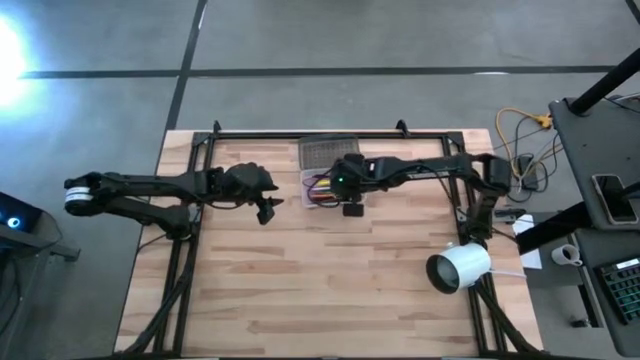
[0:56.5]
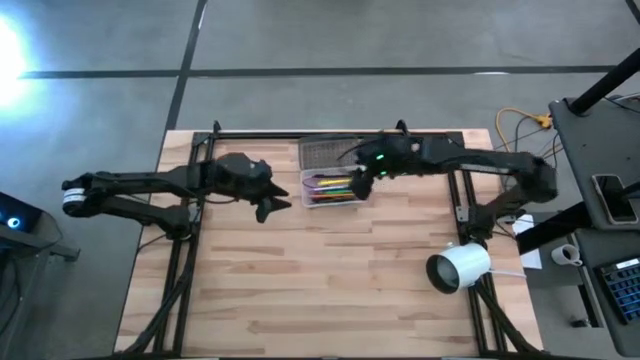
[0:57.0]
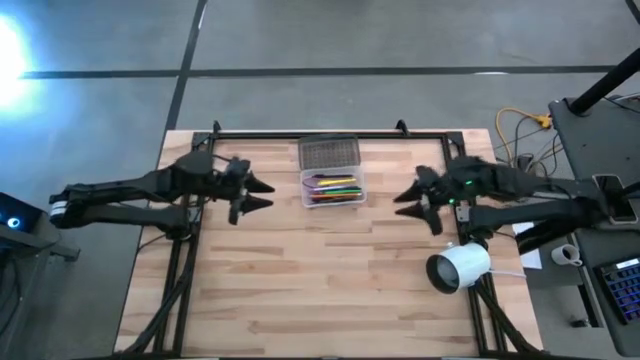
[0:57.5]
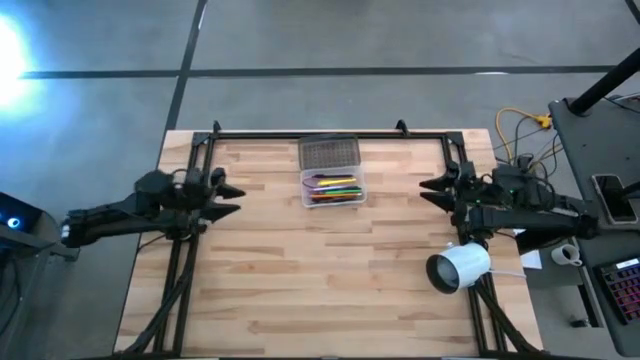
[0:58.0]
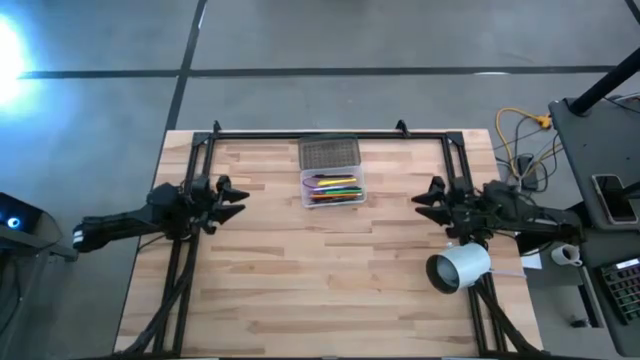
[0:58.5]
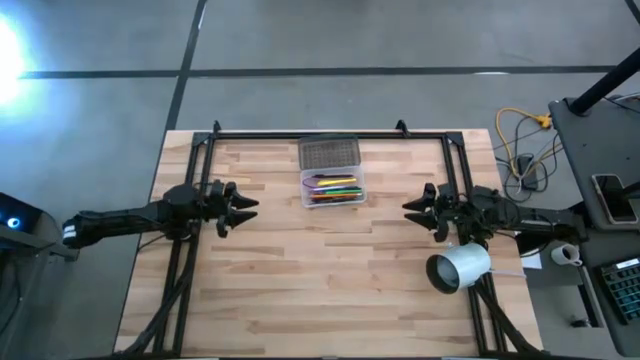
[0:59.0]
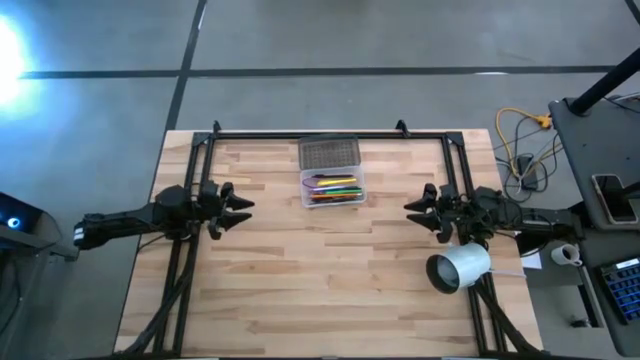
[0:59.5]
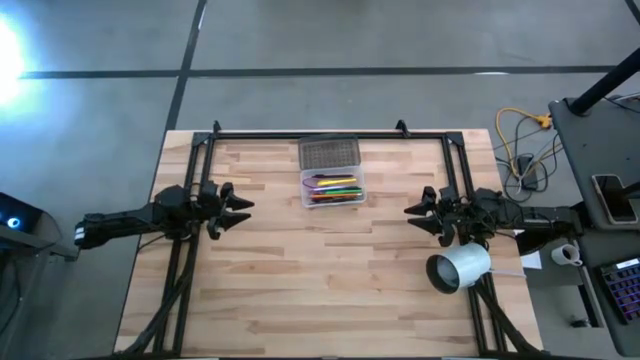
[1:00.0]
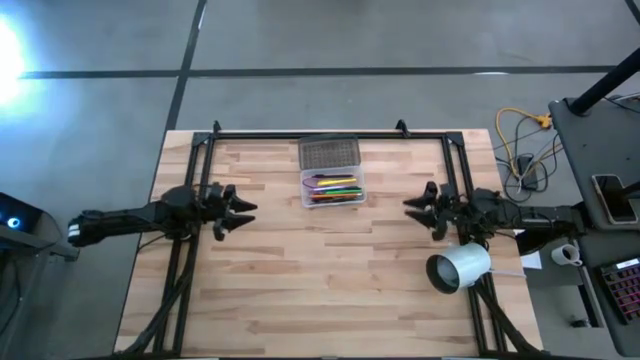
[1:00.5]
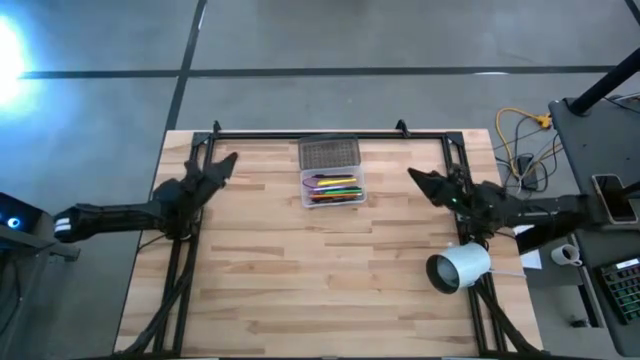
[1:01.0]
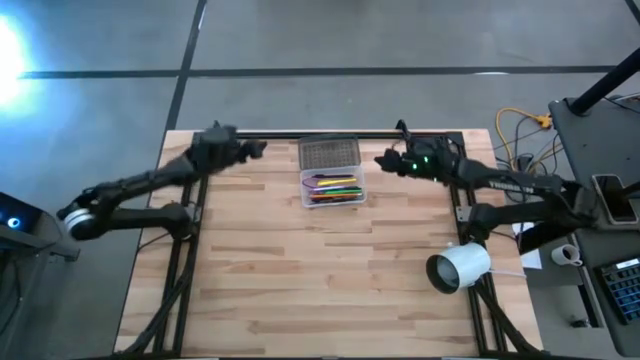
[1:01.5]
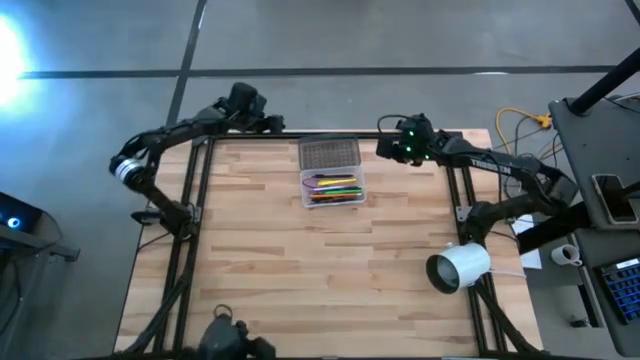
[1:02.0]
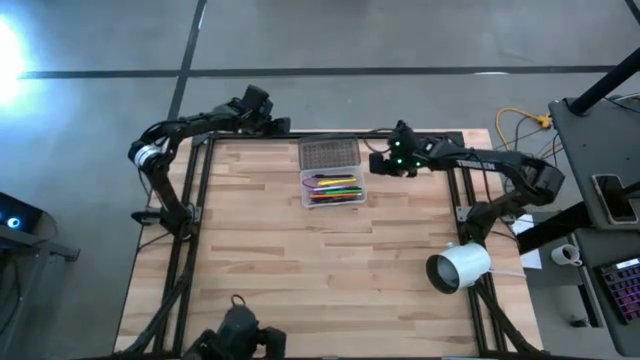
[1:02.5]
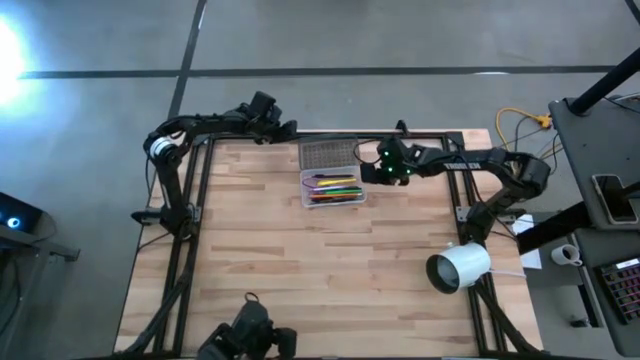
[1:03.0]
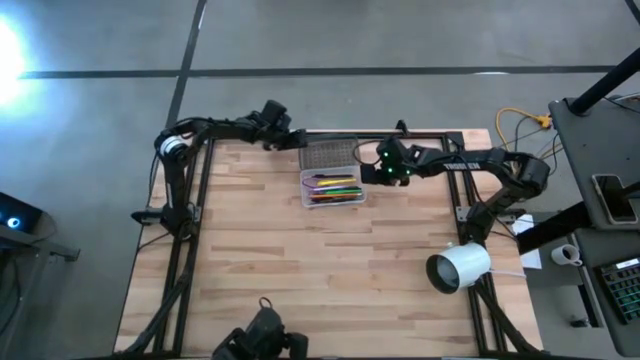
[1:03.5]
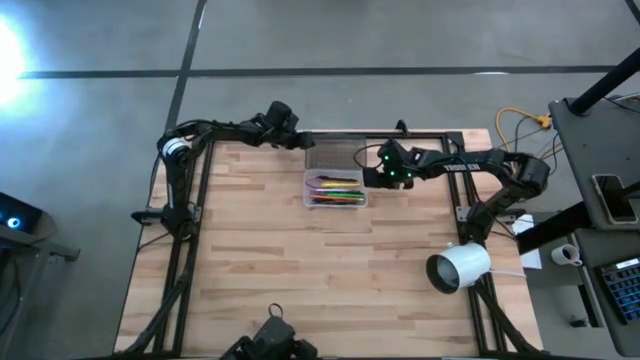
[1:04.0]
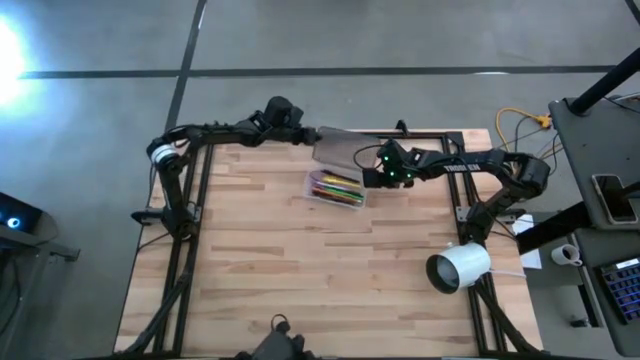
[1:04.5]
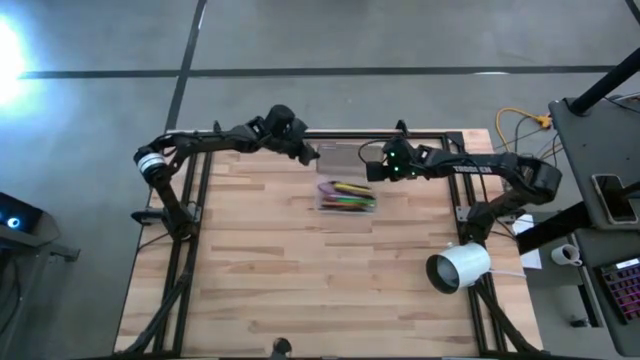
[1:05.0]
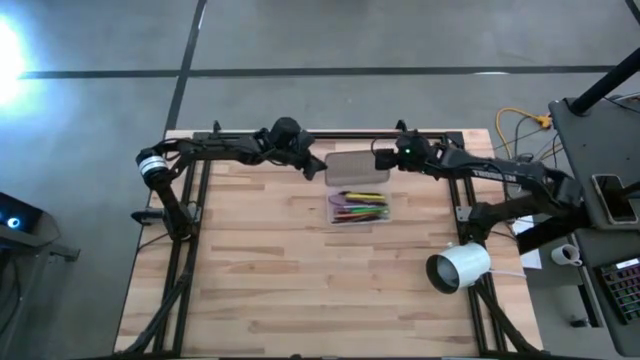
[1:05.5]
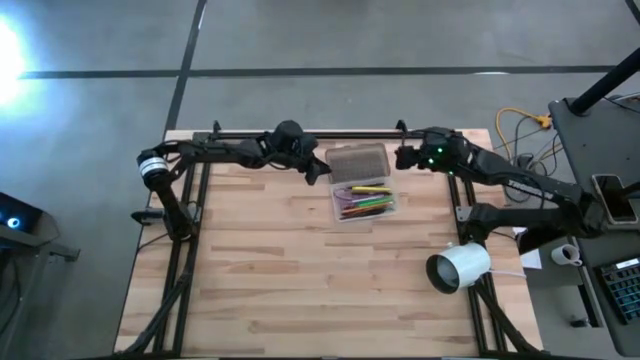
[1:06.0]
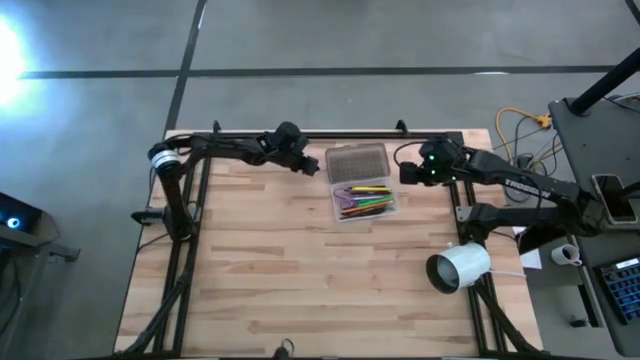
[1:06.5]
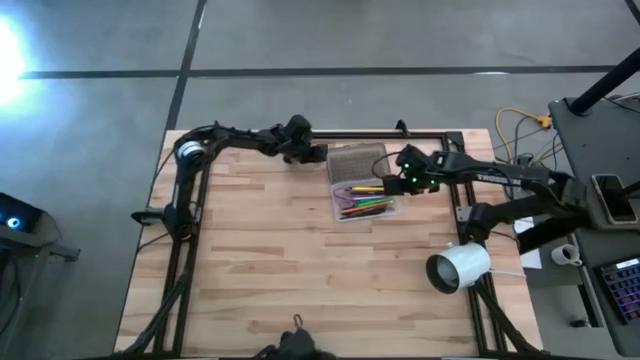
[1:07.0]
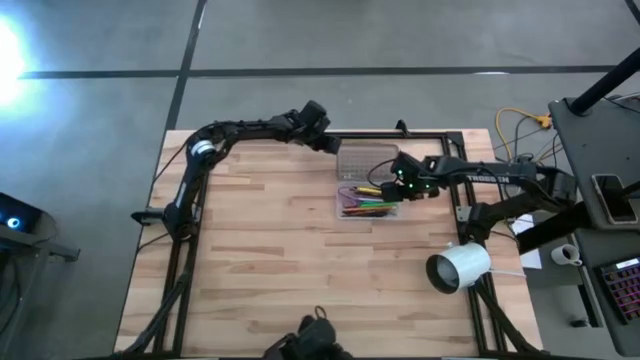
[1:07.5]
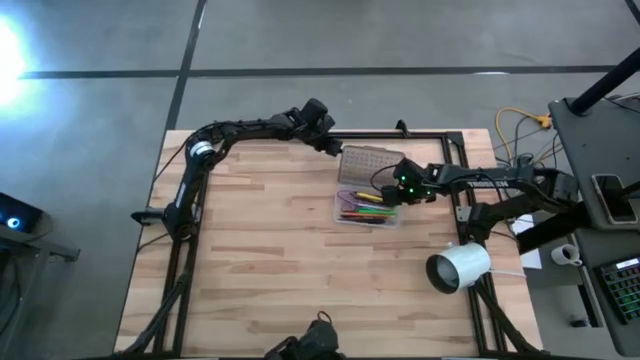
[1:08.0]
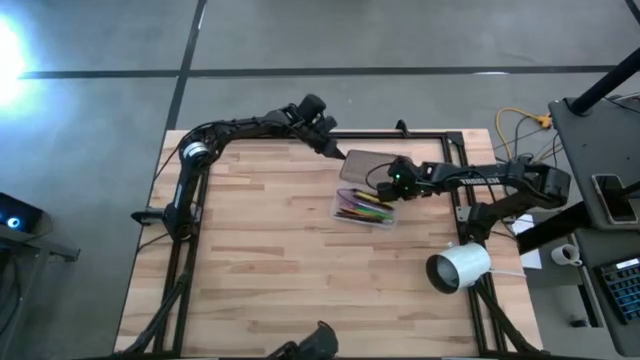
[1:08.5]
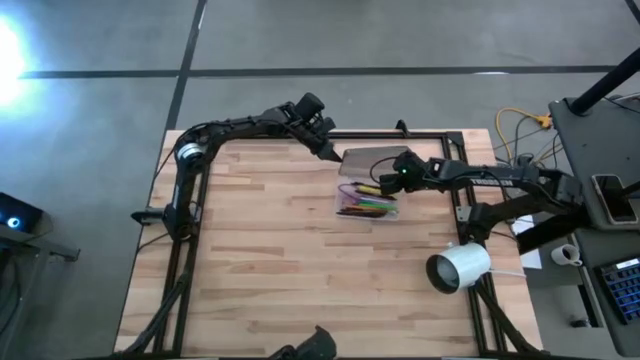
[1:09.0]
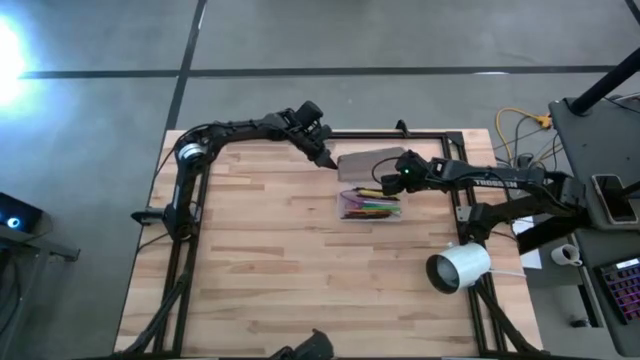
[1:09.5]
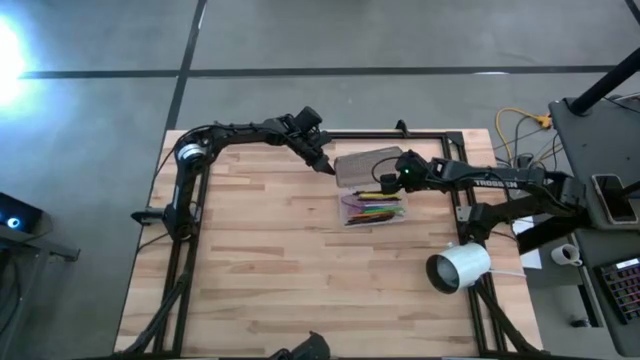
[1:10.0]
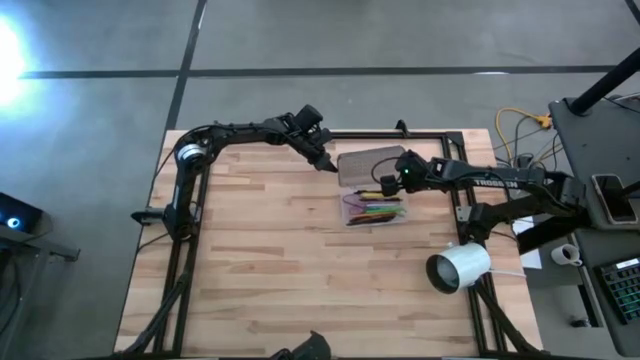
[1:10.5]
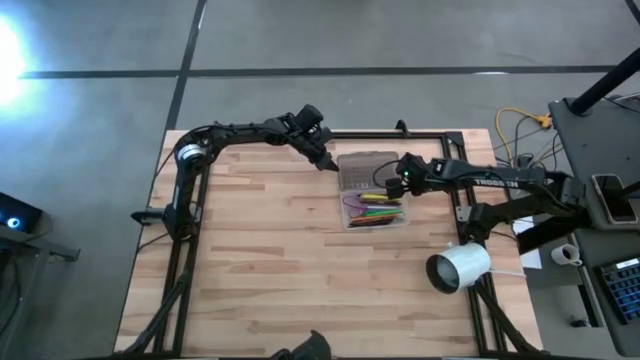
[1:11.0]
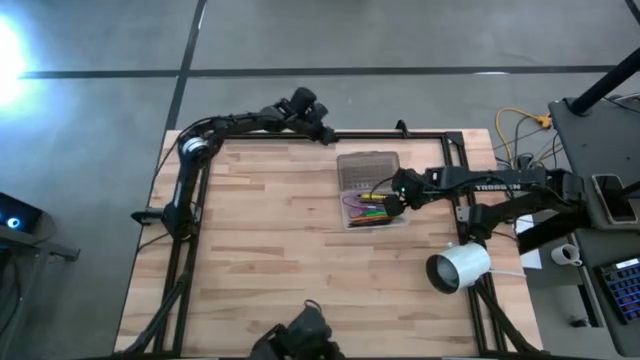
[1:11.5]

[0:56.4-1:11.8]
Task: Pick & place school supplies into a supply box
Close the black supply box

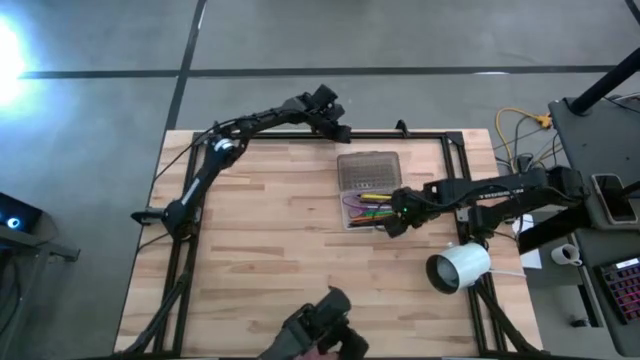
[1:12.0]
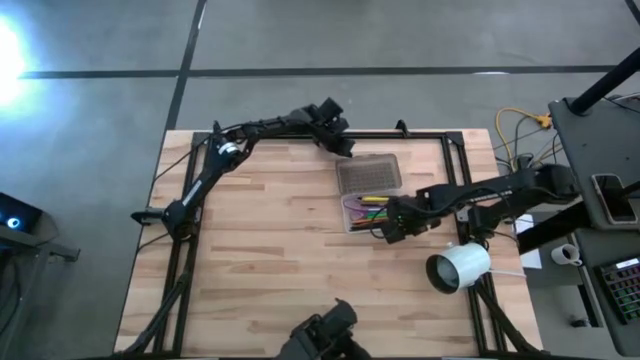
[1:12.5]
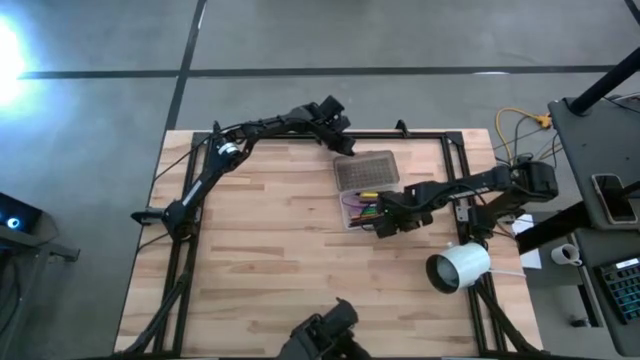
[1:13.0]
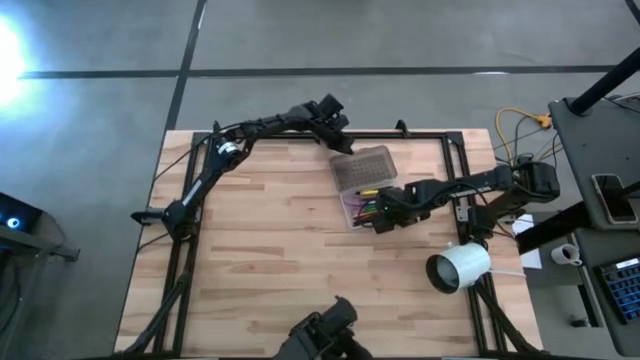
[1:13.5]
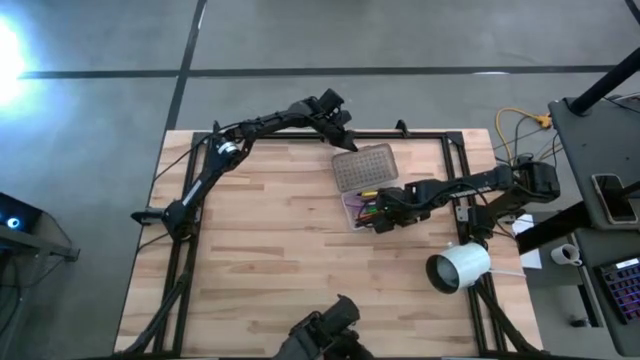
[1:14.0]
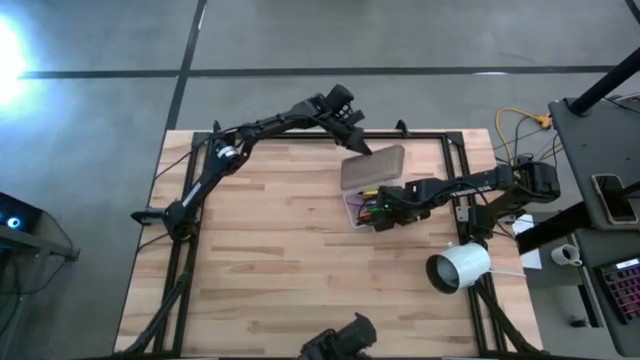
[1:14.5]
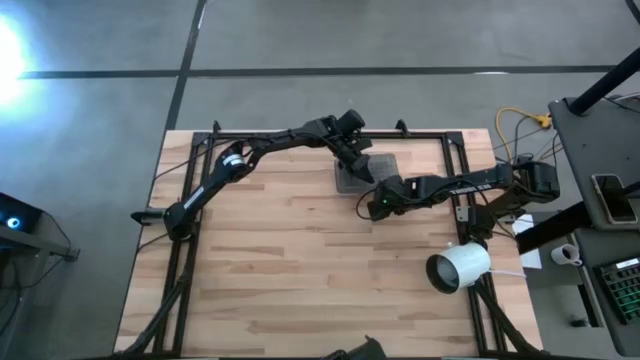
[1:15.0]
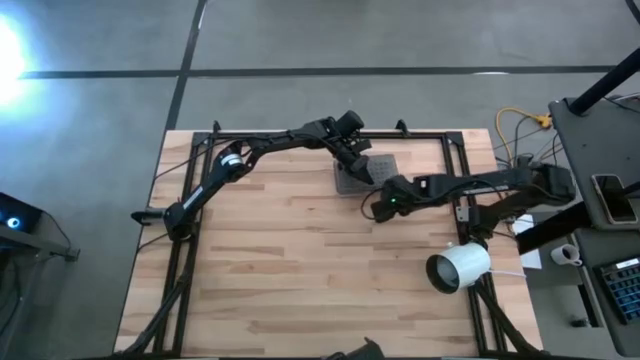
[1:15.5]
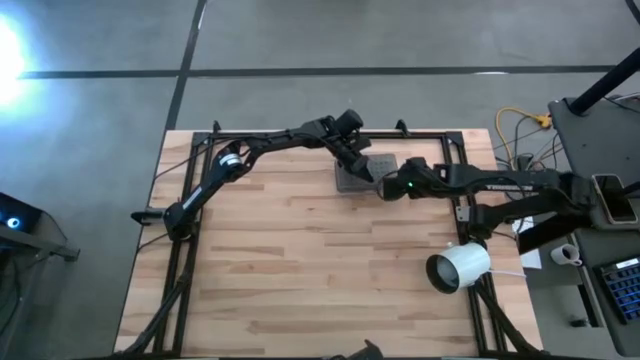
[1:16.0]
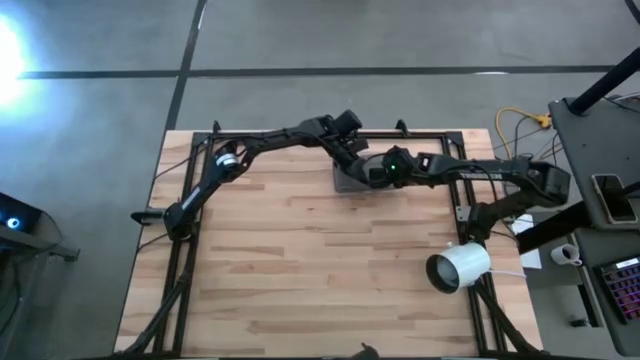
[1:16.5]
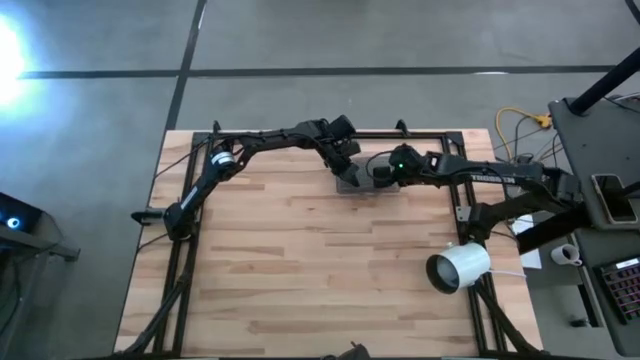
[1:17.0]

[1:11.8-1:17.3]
Close the black supply box
